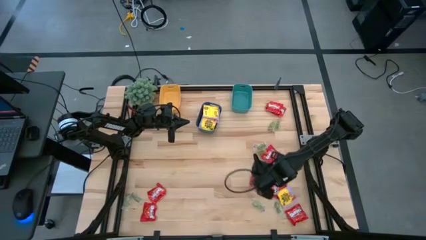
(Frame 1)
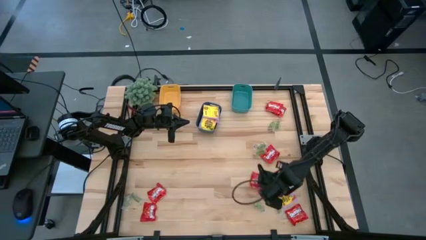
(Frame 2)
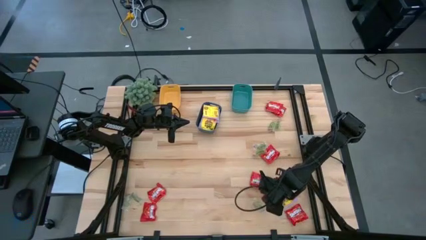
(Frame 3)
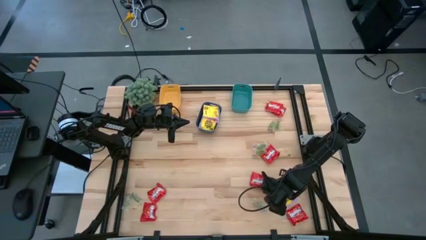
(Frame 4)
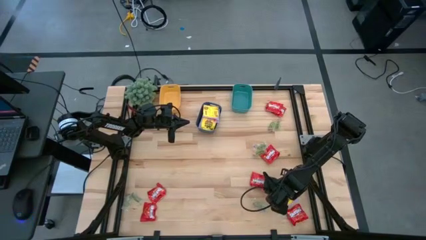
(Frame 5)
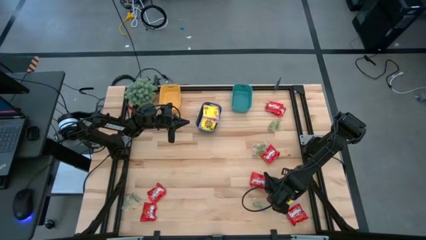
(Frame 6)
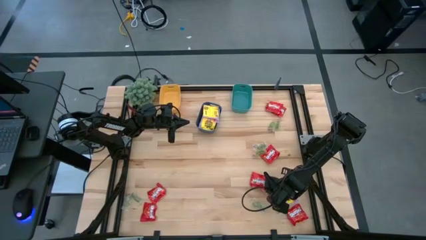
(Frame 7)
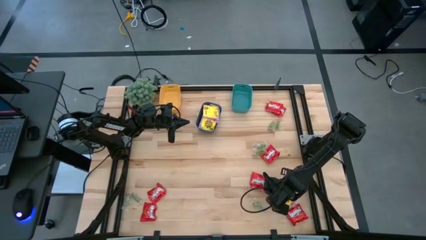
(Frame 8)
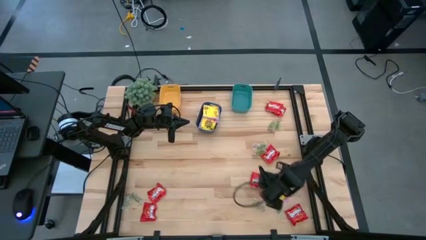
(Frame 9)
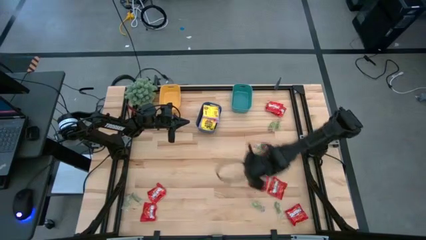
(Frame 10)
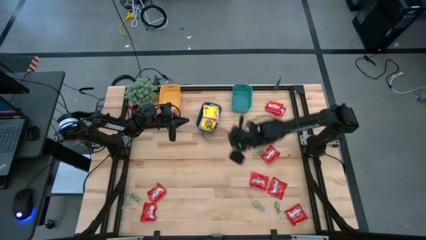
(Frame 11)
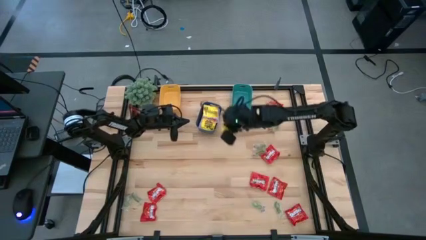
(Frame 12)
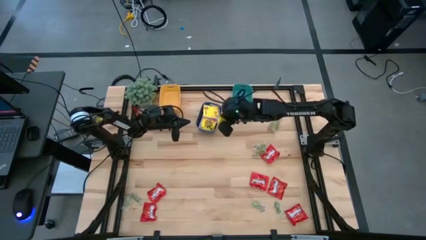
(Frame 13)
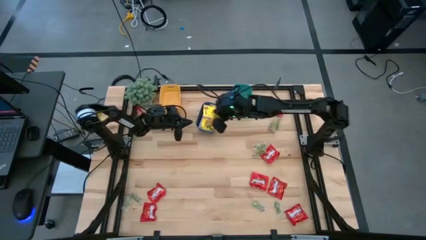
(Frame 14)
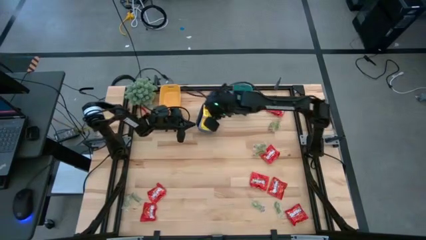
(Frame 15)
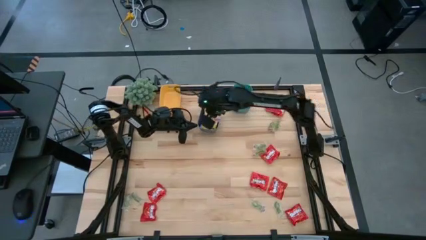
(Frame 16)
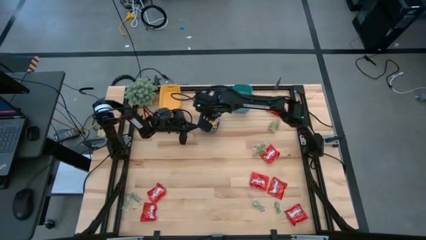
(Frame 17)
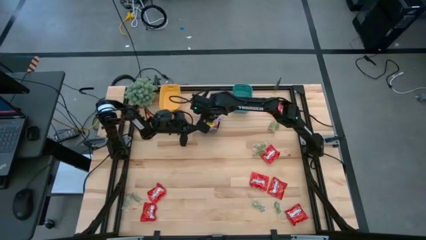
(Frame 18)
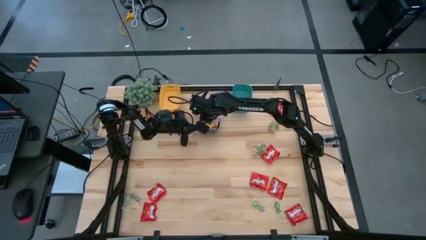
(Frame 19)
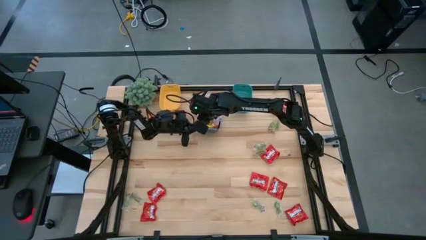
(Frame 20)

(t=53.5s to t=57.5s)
Task: Sort candy
Put the yellow candy pack into the blue bin

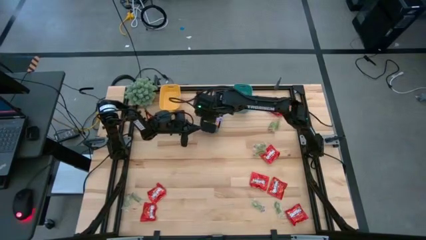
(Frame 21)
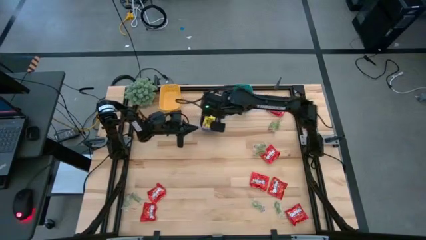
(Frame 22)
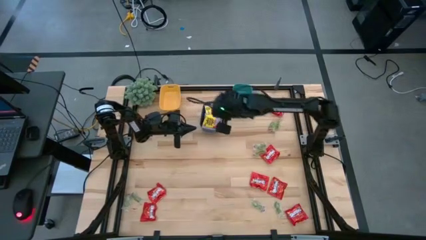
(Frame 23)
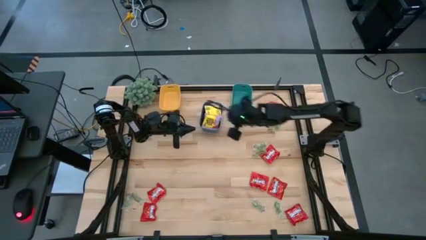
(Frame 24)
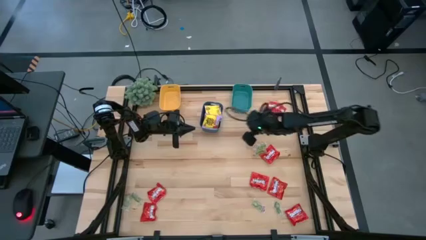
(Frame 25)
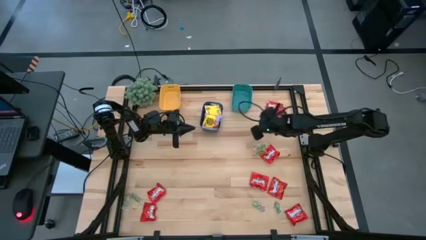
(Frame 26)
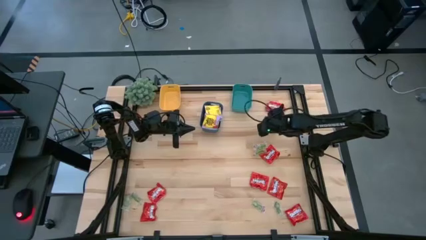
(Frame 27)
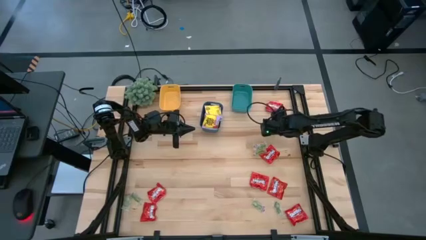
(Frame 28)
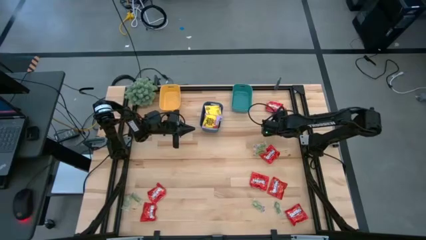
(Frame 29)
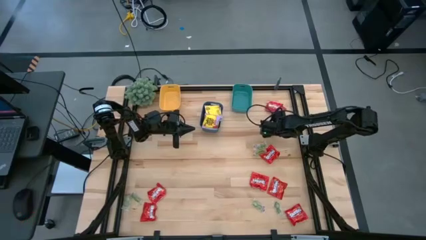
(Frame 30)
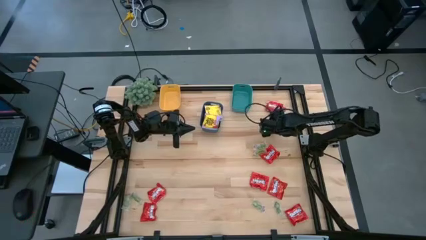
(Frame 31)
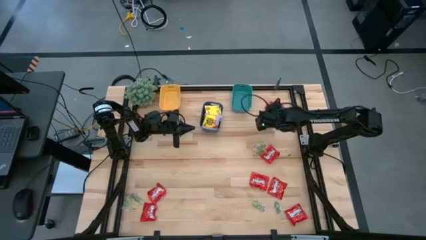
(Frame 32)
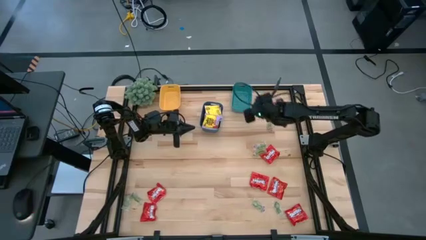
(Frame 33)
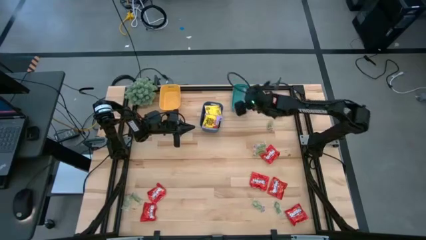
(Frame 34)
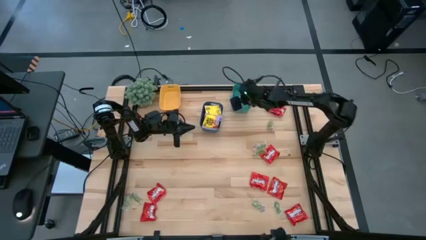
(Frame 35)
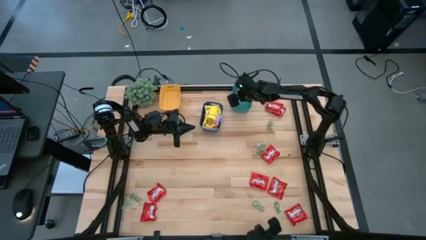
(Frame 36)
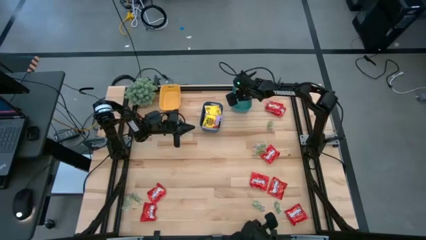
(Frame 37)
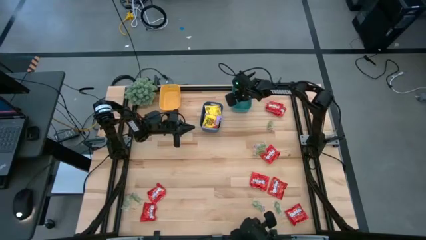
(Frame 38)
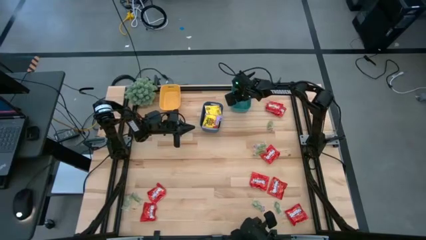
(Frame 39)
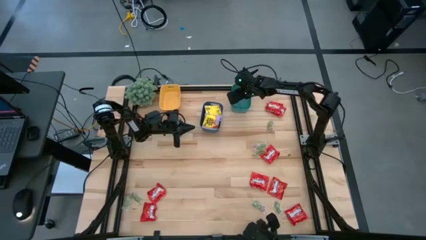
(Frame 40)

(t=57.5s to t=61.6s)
Put the green gummy into the green bin

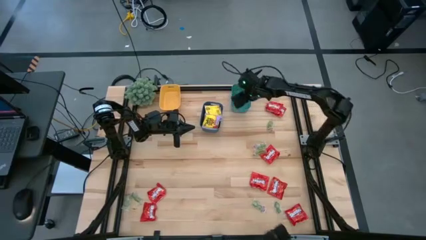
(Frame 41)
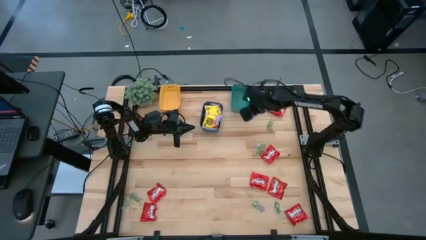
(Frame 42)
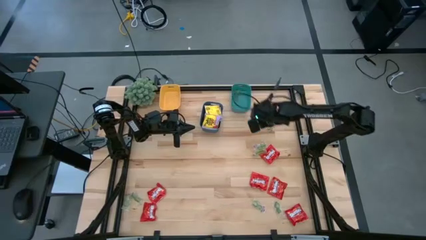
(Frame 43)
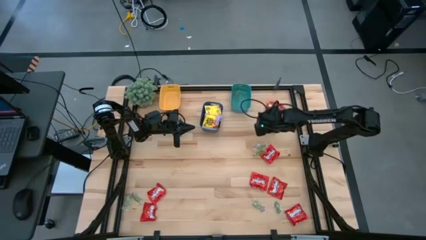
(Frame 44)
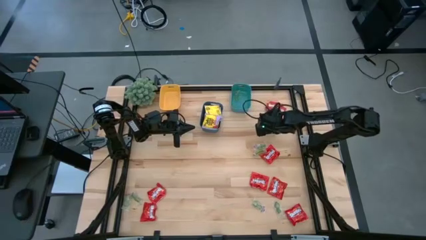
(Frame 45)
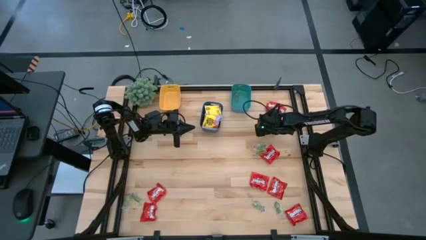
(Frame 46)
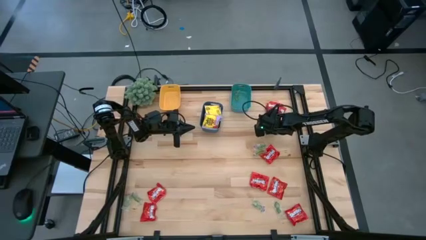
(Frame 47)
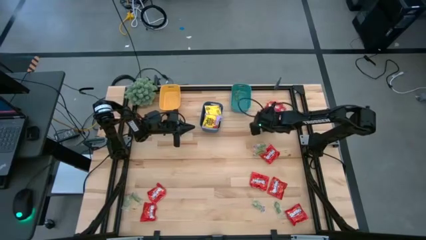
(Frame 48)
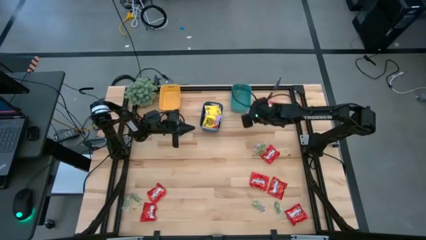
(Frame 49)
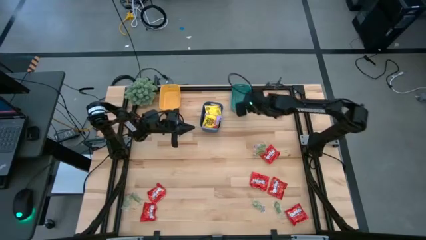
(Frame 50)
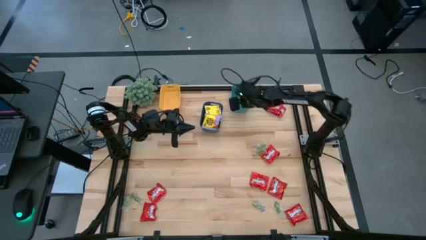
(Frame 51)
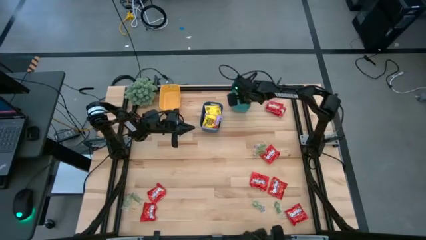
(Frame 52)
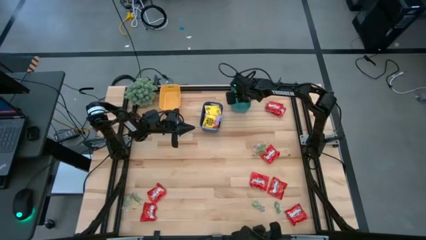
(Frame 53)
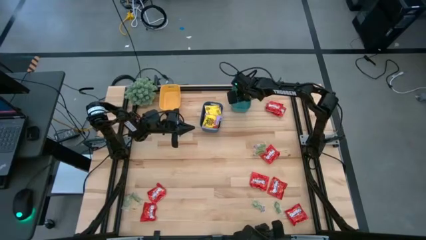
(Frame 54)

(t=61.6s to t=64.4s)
Put the green gummy into the green bin

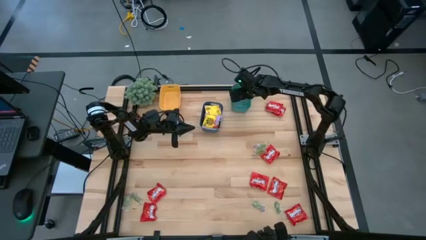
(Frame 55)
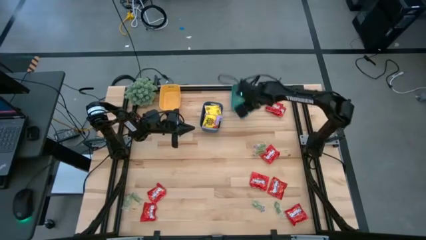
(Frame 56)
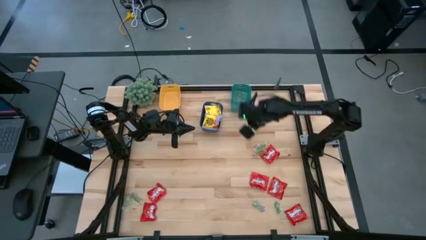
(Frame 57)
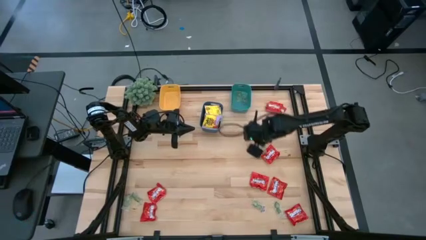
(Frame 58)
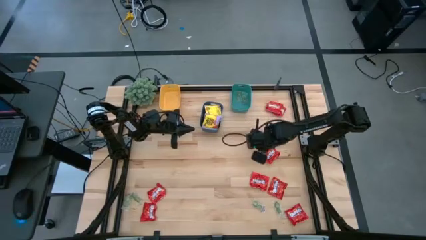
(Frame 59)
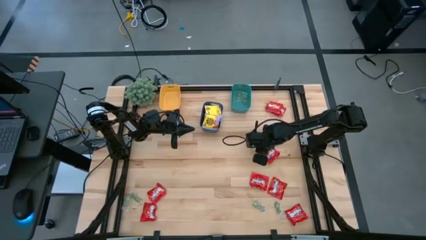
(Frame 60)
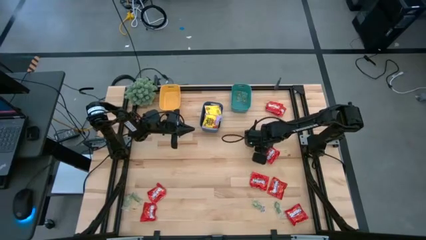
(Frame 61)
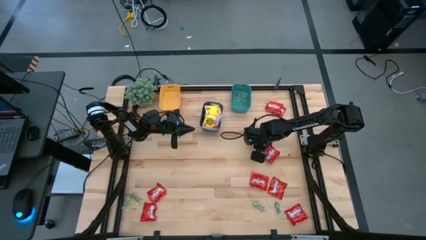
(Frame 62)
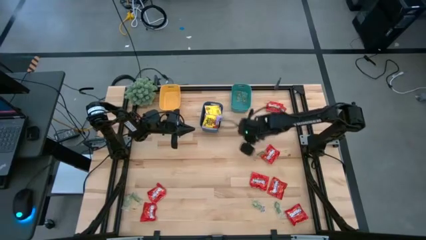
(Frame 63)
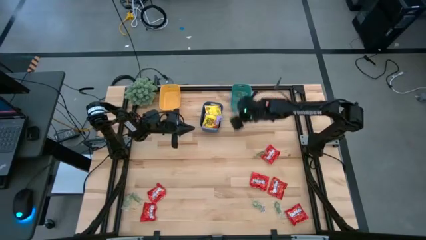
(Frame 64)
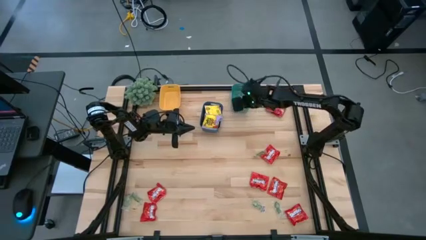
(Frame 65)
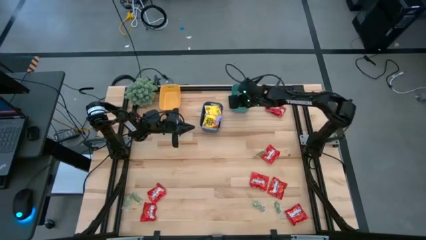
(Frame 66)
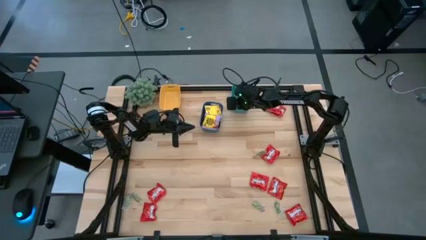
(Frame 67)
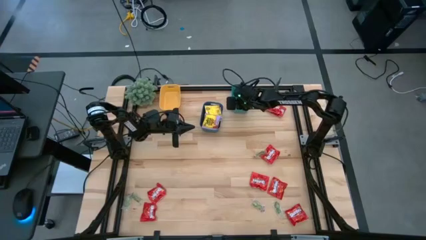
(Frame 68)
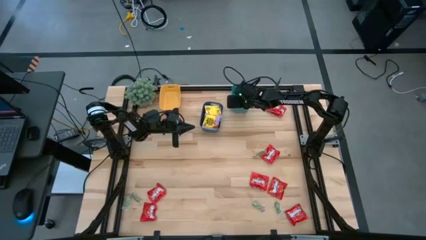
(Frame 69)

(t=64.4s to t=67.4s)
Put the green gummy into the green bin

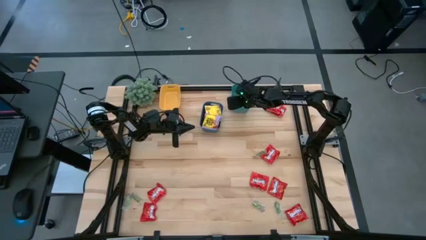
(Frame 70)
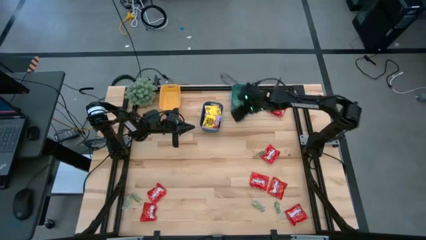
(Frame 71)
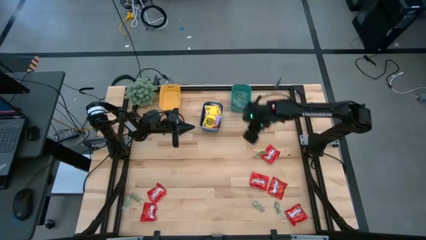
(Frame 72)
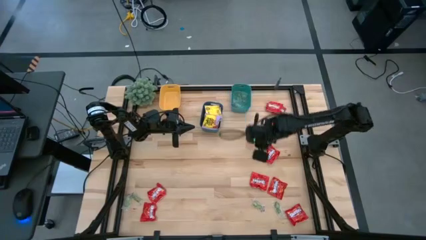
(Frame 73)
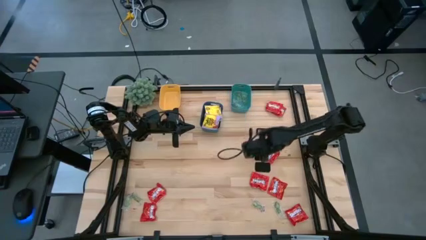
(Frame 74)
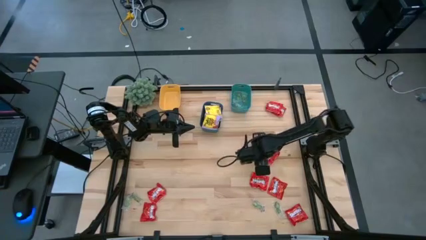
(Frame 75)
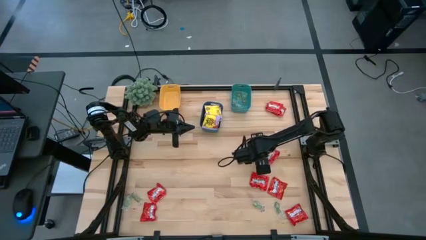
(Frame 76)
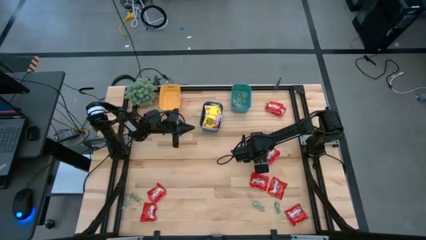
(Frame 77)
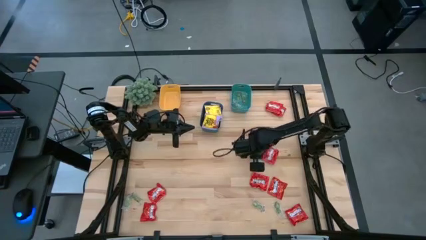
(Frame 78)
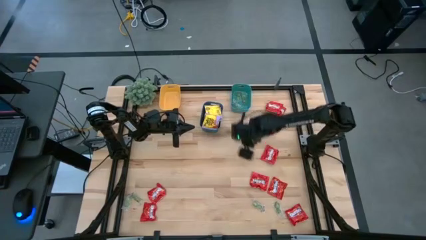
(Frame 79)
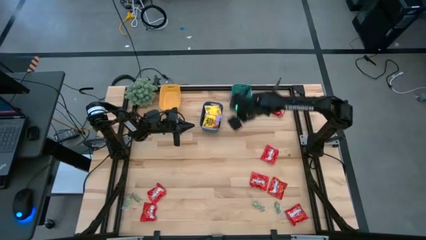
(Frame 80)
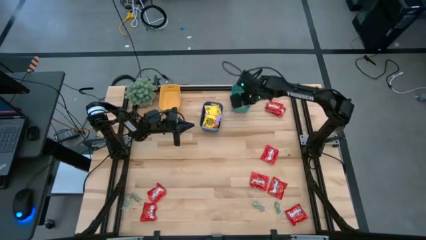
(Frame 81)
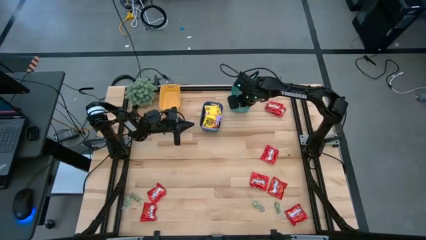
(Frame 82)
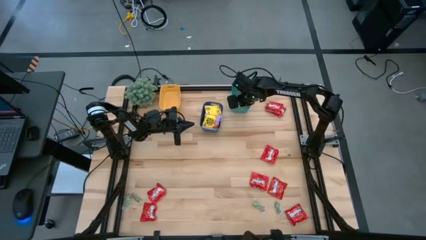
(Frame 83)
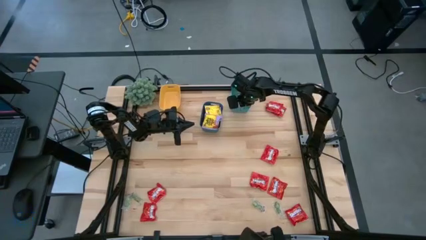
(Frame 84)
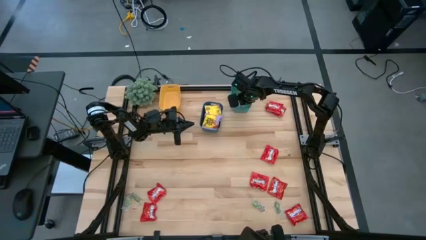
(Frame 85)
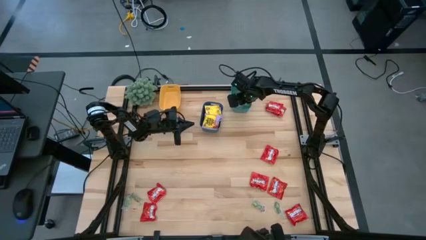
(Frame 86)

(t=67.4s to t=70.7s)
Put the green gummy into the green bin
